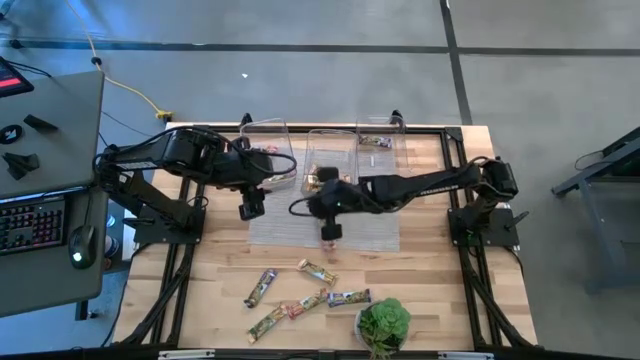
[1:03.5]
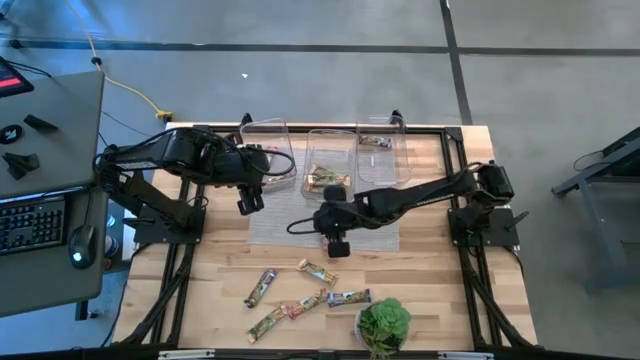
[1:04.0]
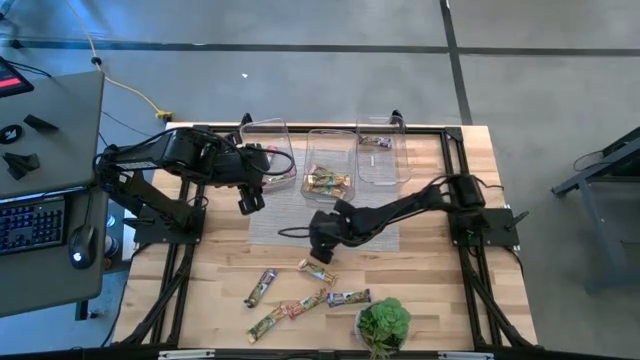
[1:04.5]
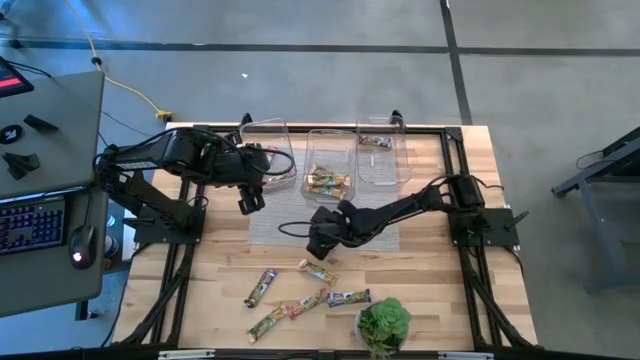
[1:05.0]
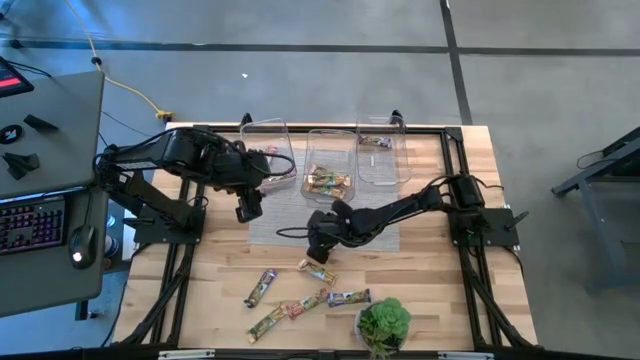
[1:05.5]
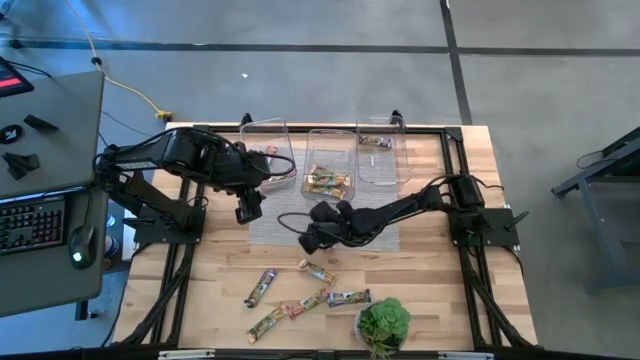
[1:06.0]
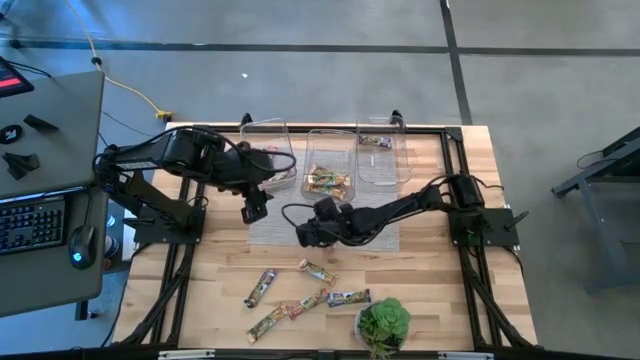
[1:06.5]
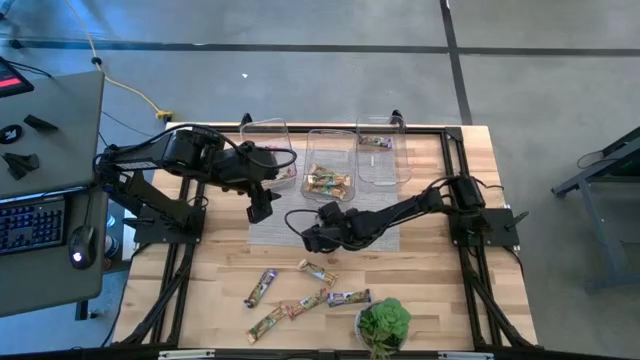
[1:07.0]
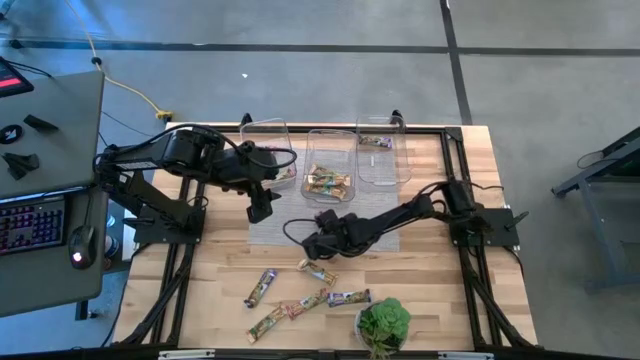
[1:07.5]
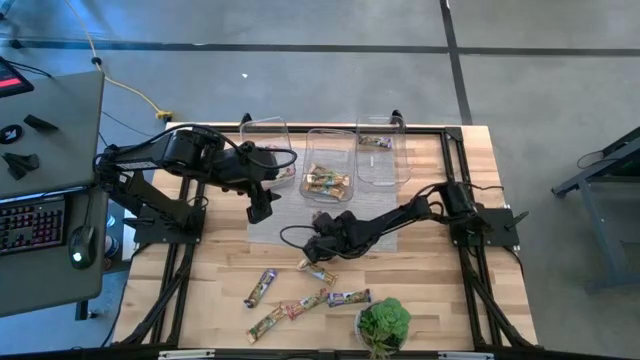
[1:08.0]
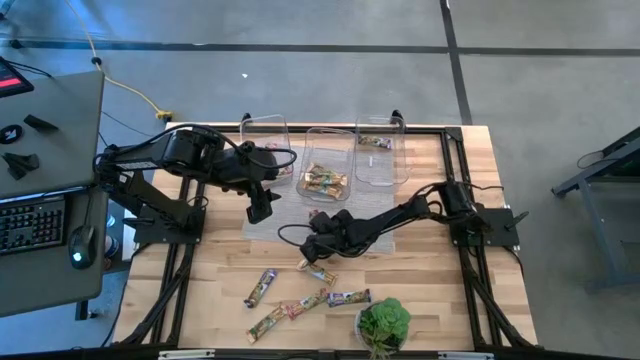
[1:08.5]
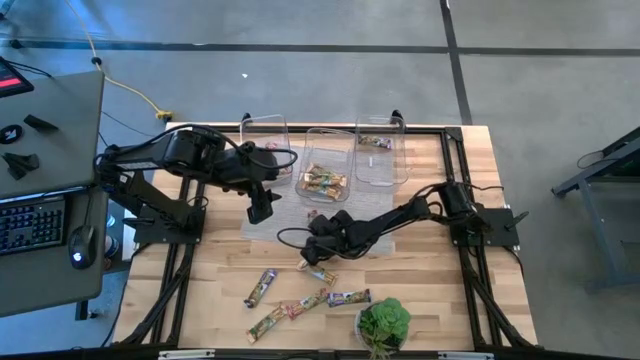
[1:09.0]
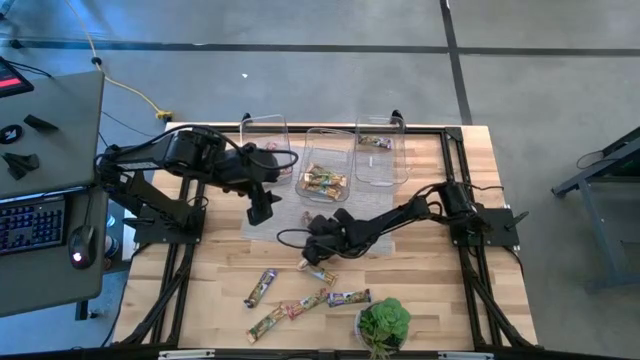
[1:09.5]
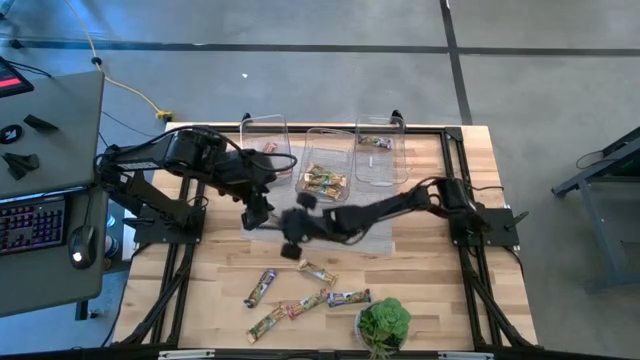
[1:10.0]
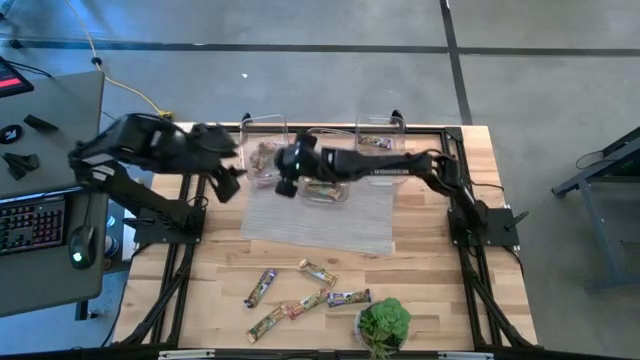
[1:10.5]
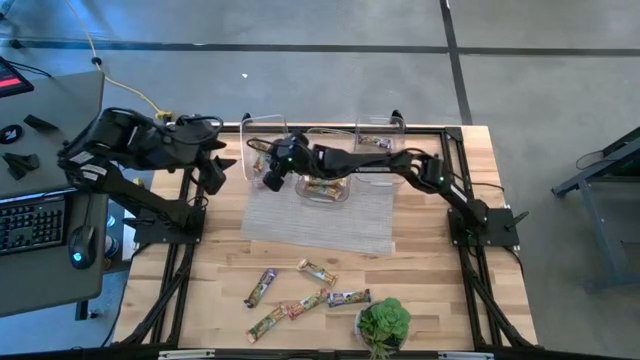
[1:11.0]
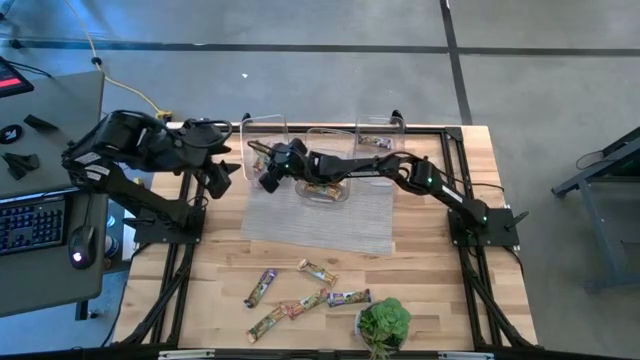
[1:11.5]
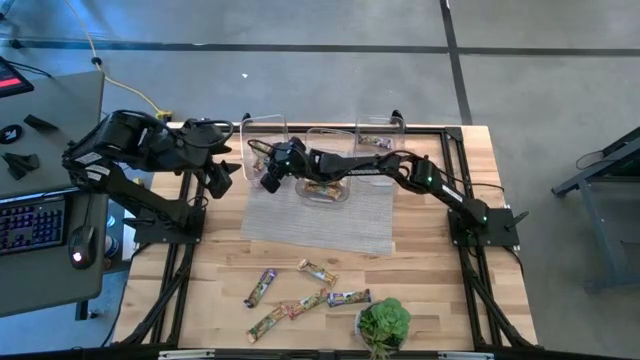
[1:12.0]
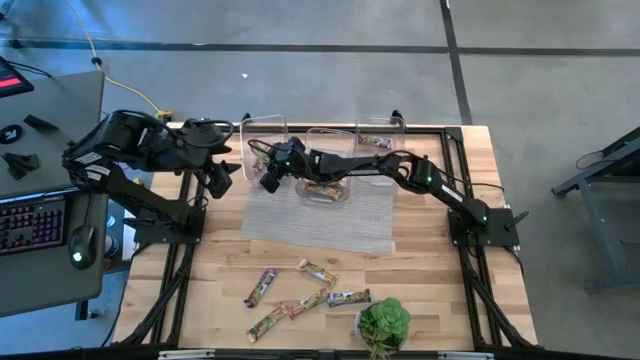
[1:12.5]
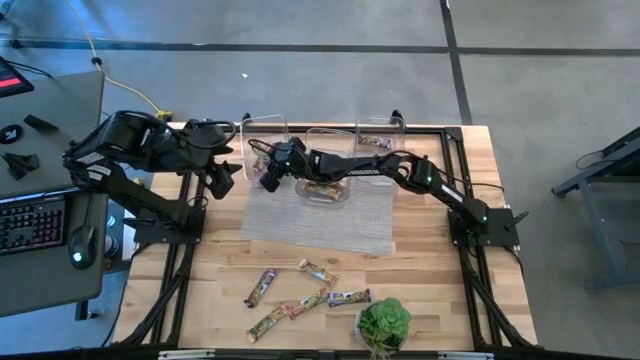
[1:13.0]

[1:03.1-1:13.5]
Task: Pick and place Granola Bars by type
Put the red granola bar into the left transparent bin

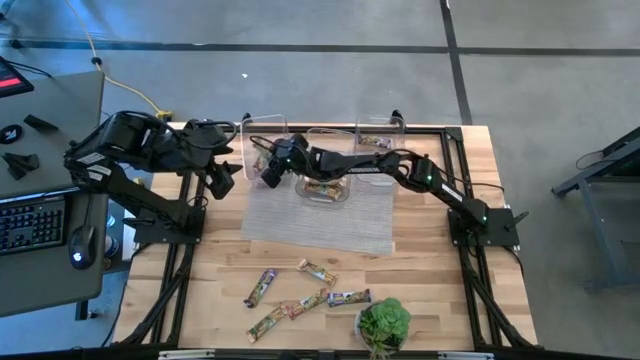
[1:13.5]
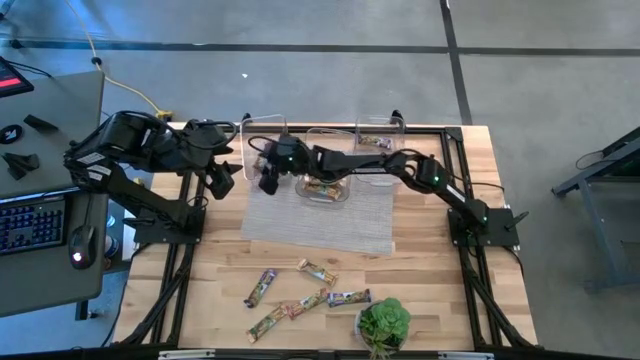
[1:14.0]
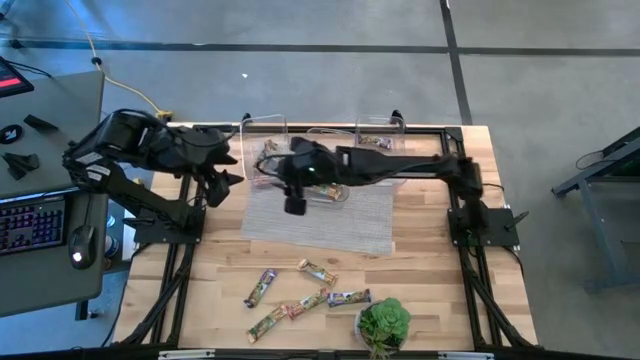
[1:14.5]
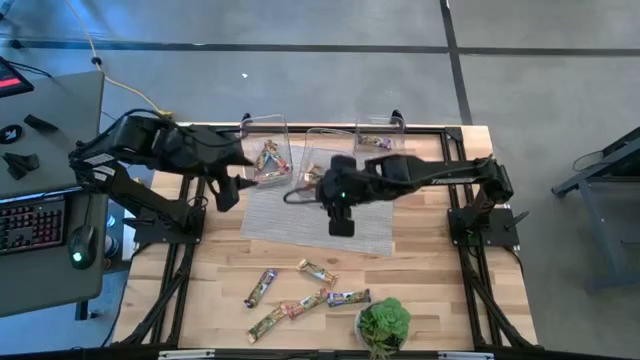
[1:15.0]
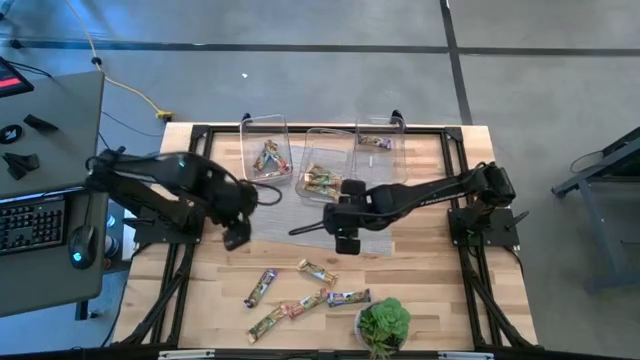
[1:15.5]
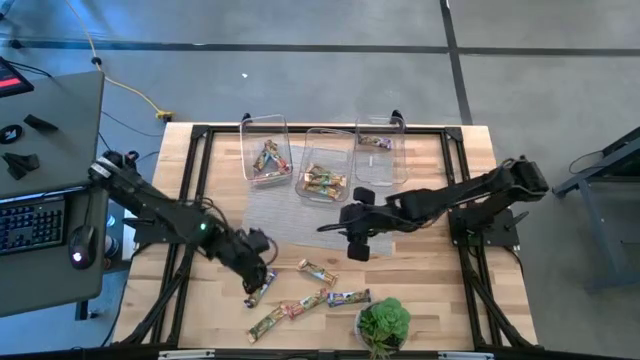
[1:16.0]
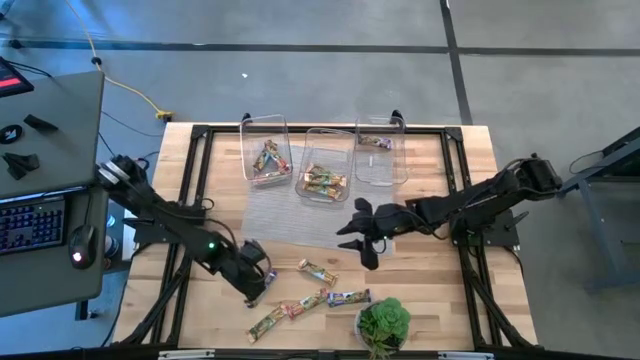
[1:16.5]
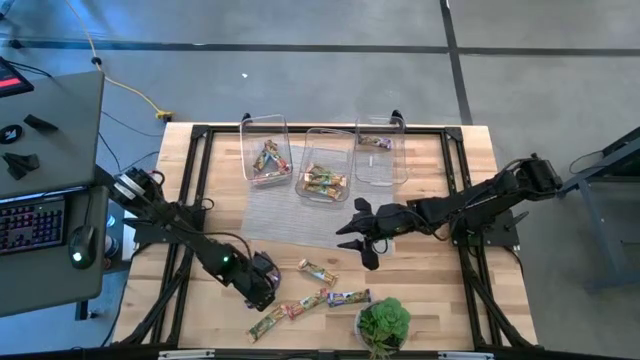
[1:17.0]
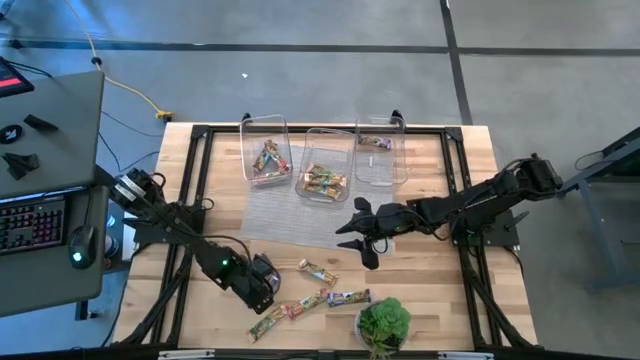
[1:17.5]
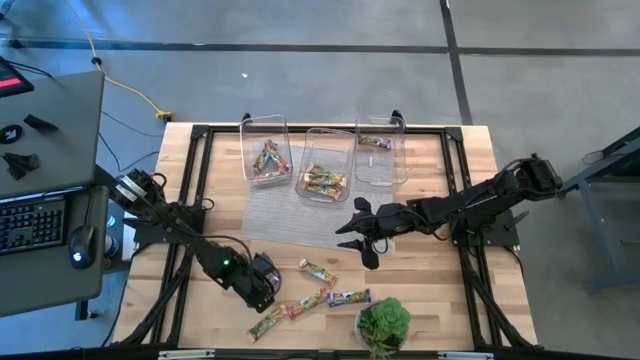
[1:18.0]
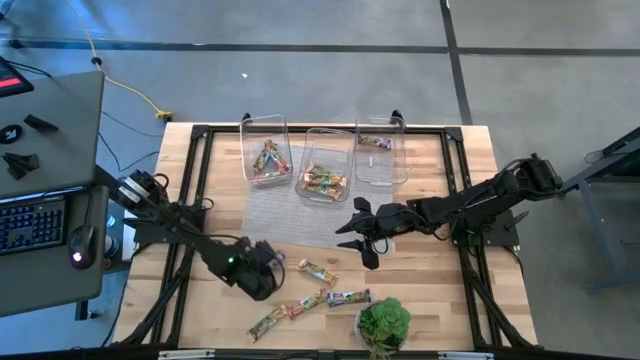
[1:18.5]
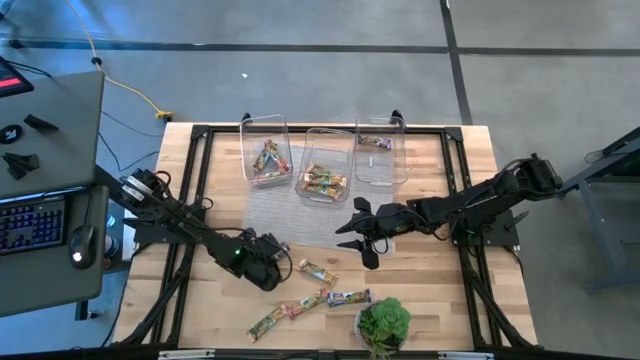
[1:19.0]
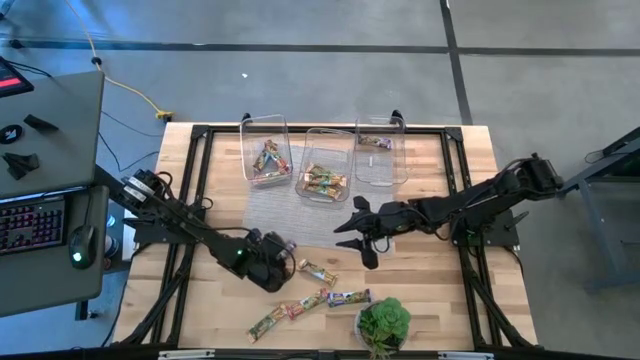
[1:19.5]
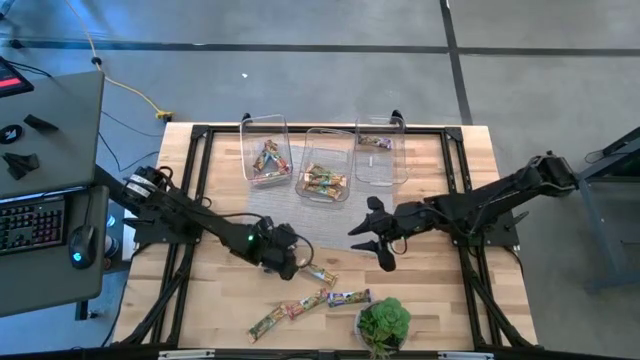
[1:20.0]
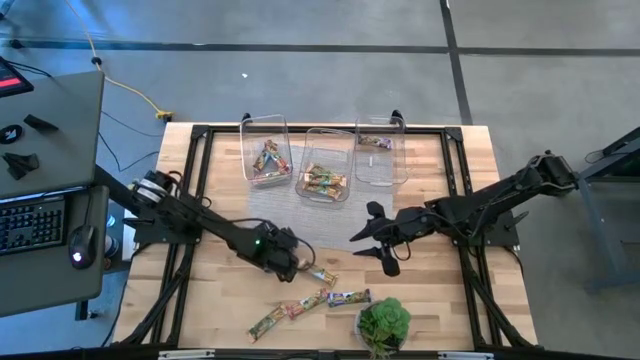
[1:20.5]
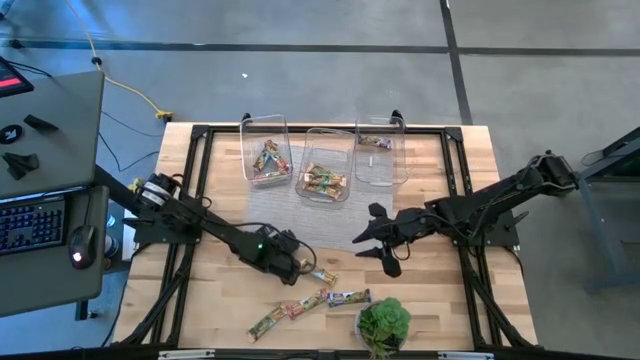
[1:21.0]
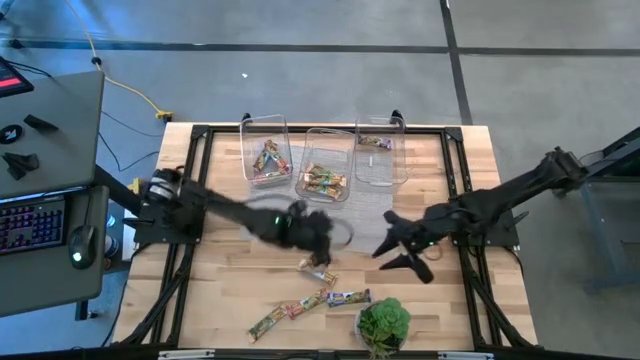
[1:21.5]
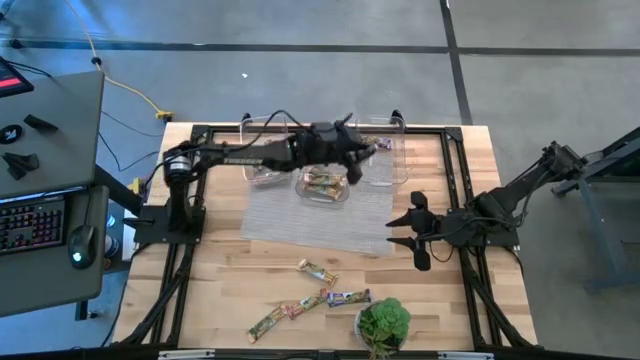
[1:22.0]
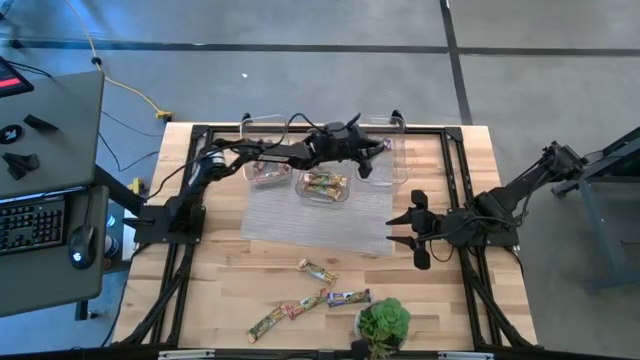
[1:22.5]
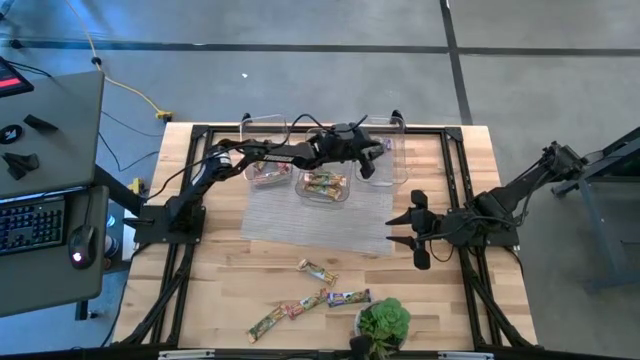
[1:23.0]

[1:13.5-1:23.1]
Put the blue granola bar into the right transparent bin

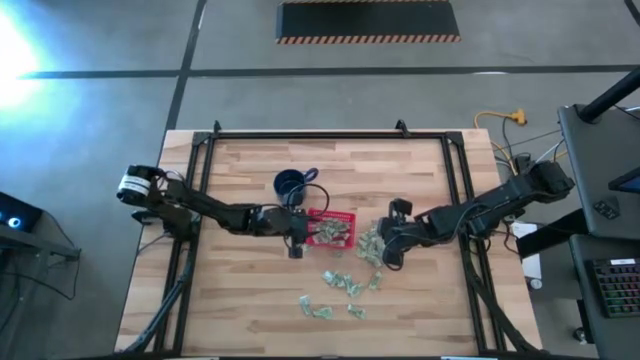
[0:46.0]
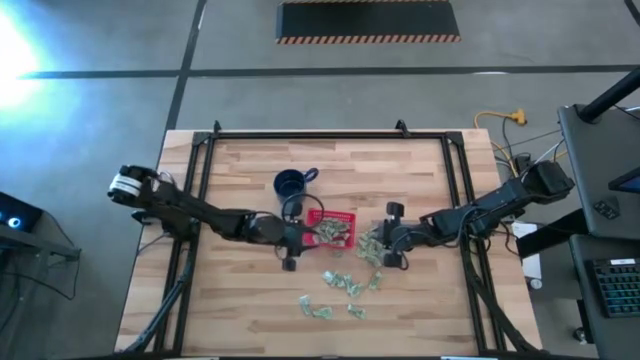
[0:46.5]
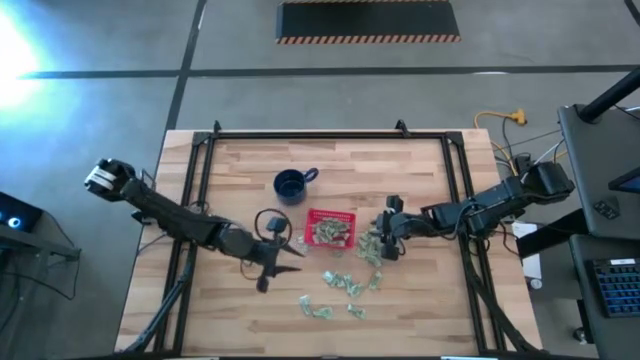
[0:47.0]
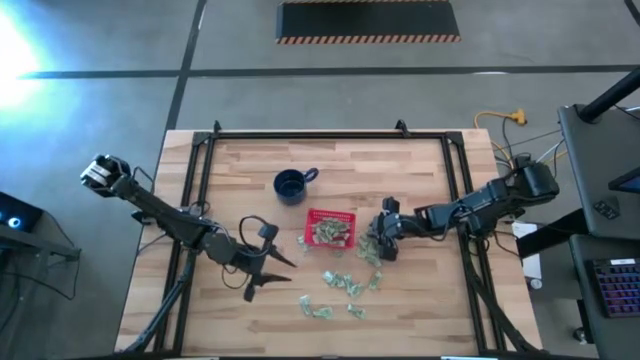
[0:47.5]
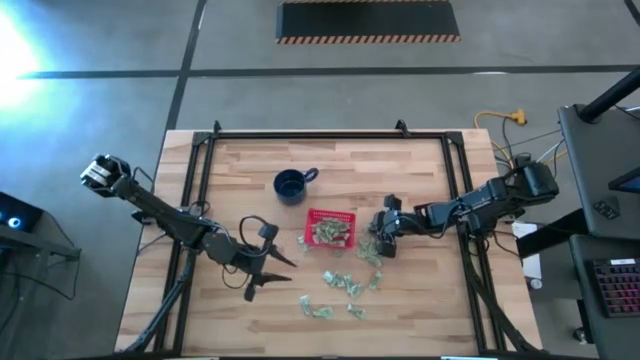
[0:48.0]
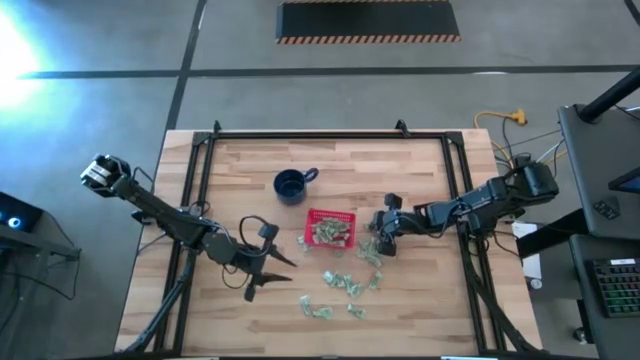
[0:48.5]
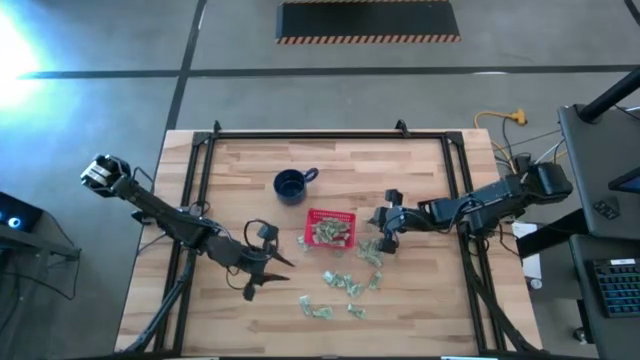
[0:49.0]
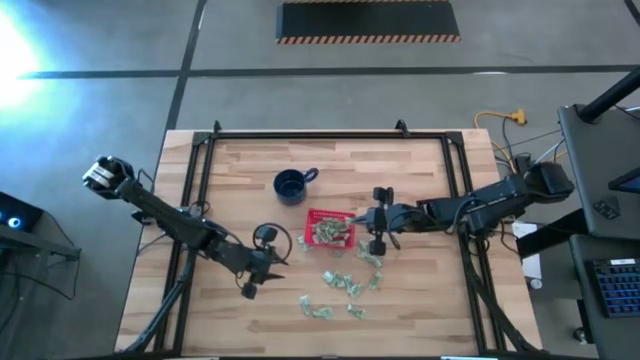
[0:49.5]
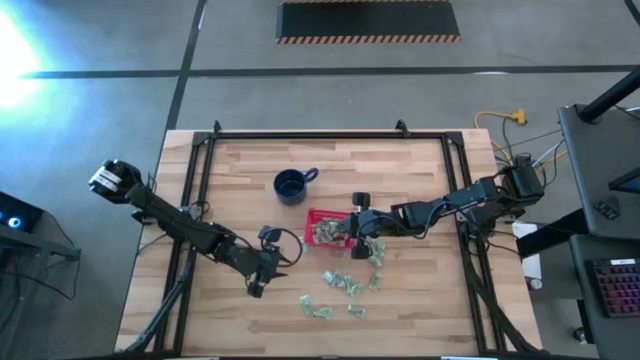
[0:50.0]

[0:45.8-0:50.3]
Task: Pick and place Stevia / Truvia into bins
Put the white stevia packet into the red basket
